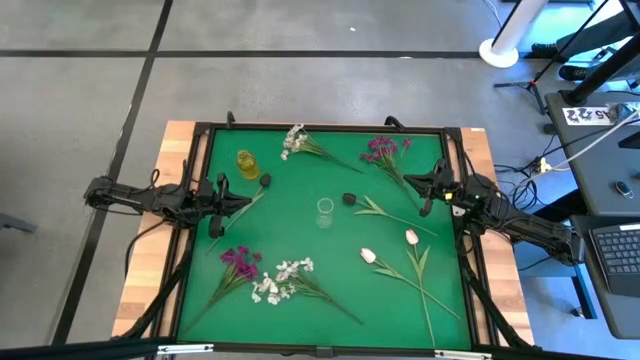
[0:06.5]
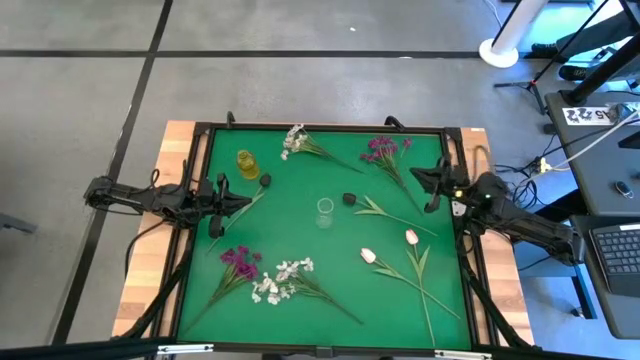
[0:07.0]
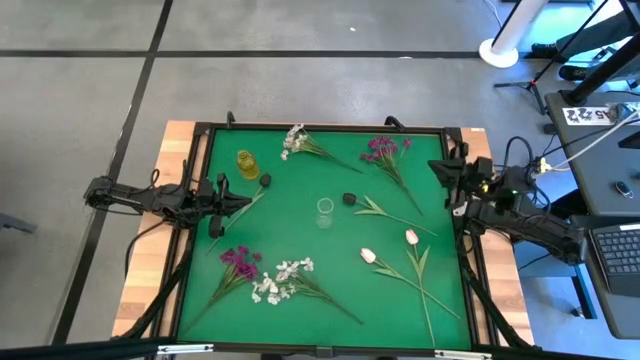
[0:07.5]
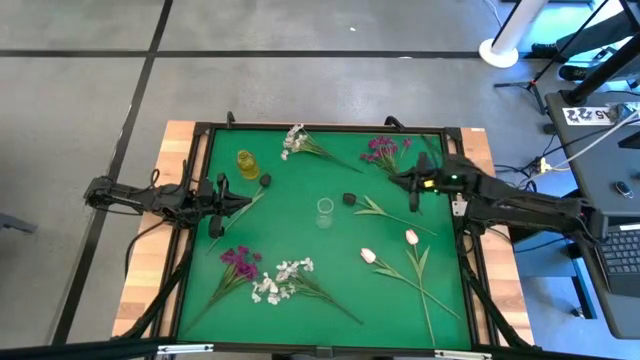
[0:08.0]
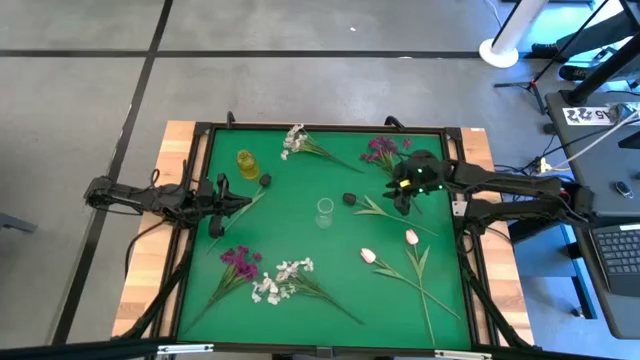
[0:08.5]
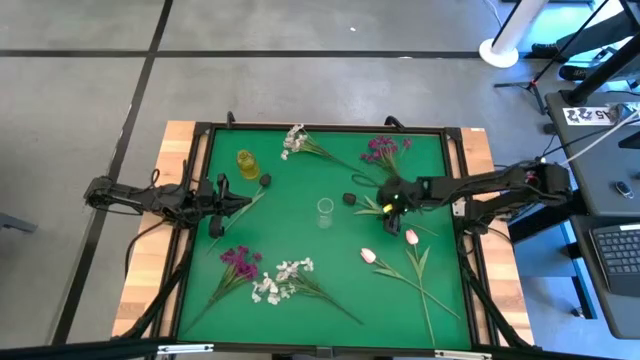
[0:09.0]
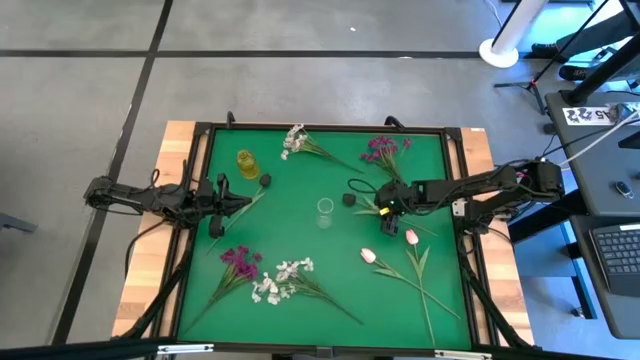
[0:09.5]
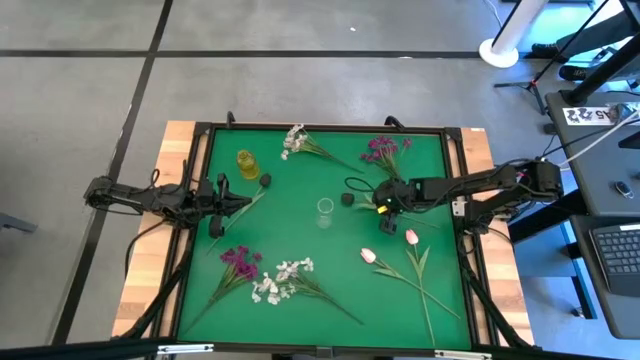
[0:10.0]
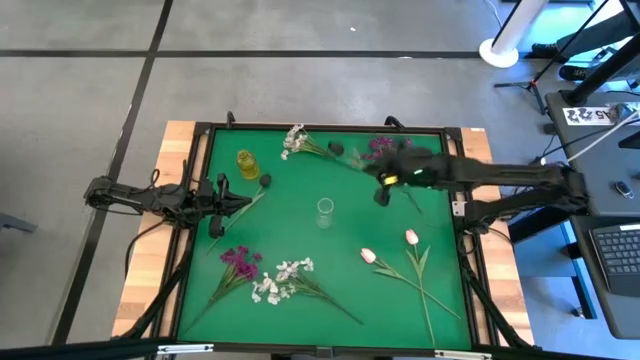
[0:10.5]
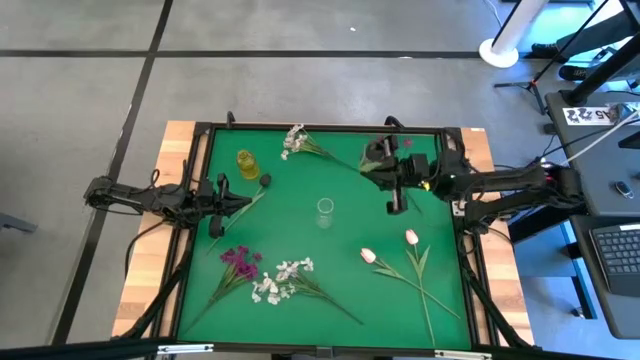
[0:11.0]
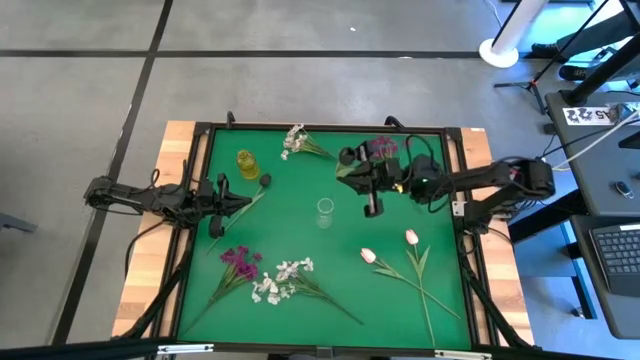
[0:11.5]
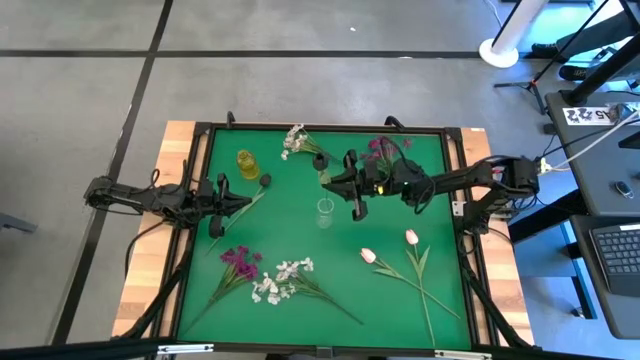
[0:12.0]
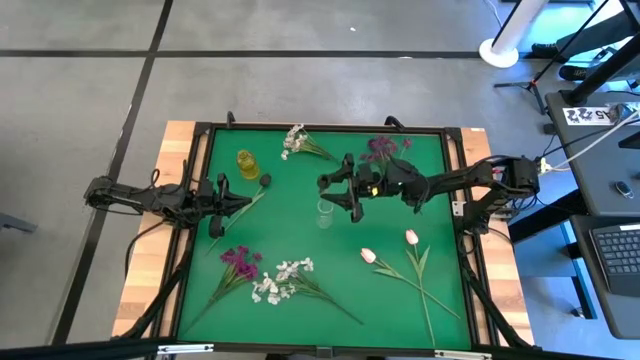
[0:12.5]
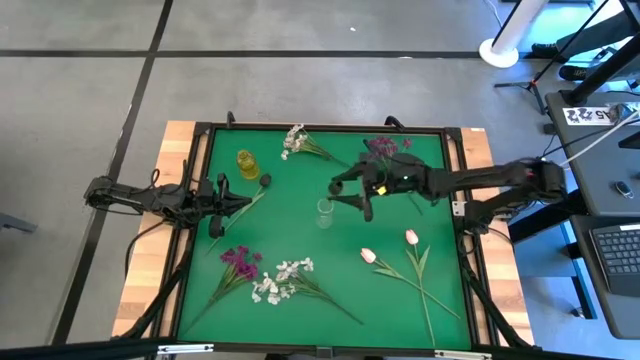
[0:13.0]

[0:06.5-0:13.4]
Task: Sort flowers into vase by color
Put the right black tulip into the transparent vase

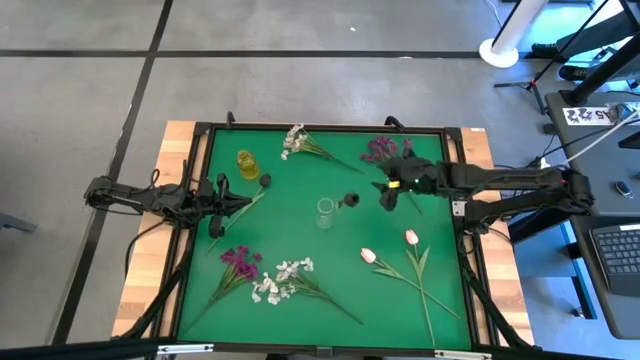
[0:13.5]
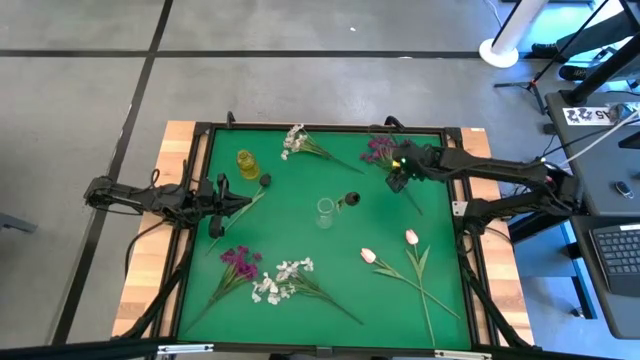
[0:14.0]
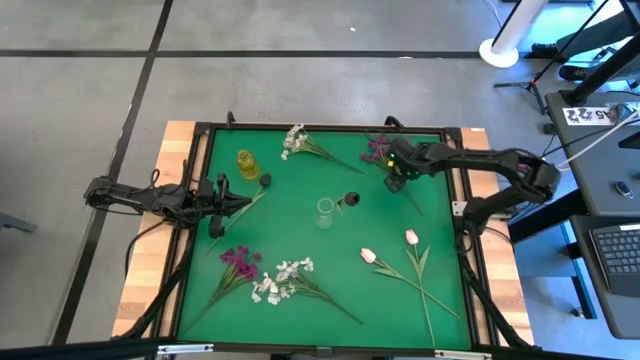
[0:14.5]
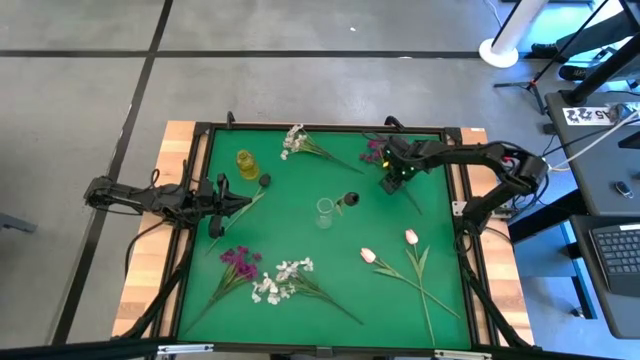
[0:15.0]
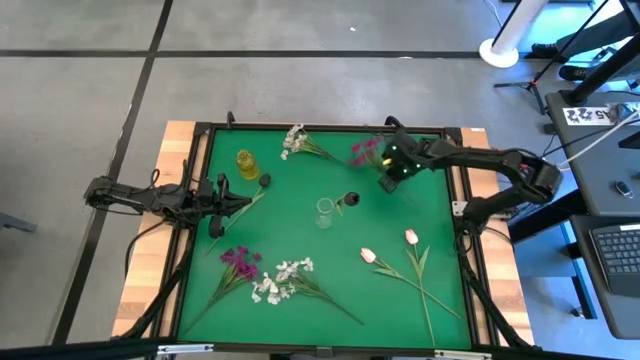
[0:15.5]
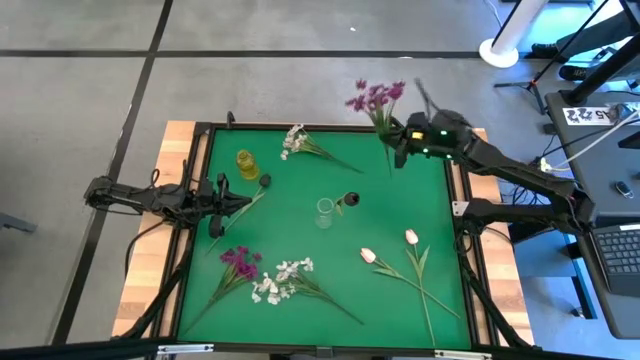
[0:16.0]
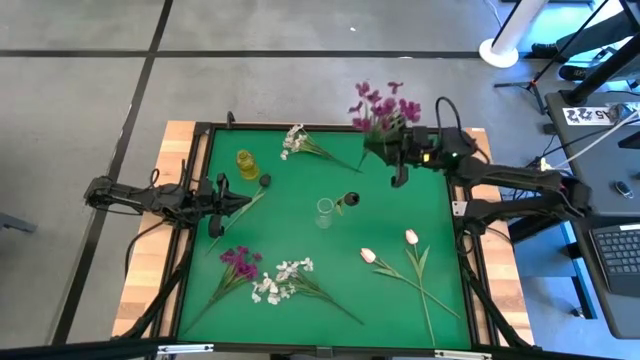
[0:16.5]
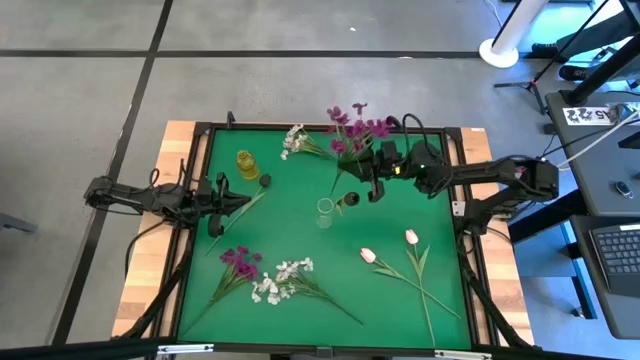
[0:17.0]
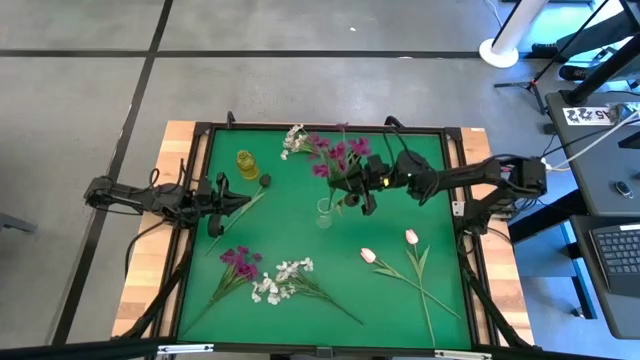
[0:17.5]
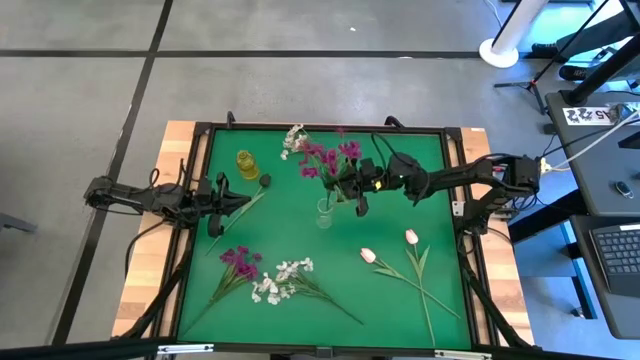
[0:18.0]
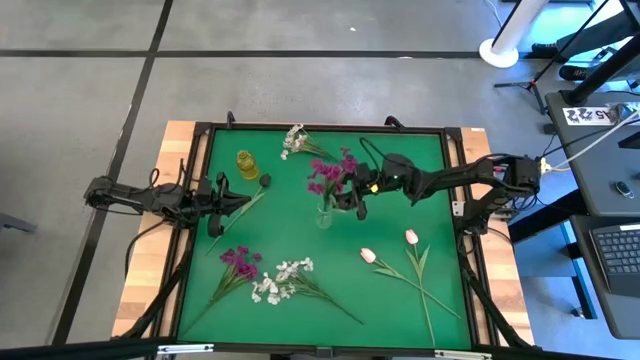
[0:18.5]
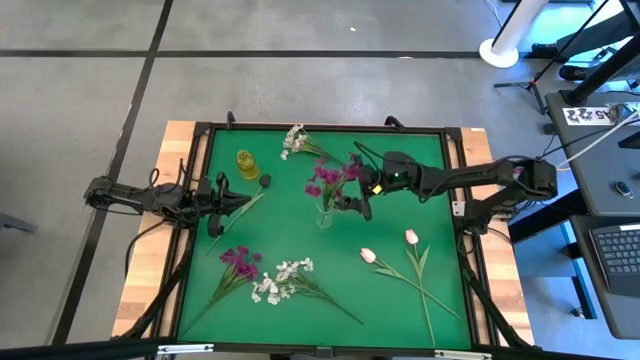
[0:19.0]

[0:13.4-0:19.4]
Put the top violet flowers into the transparent vase

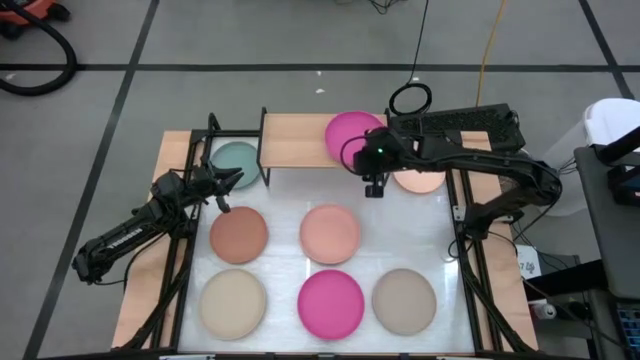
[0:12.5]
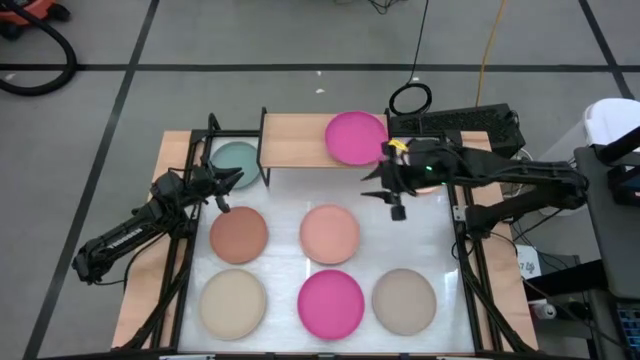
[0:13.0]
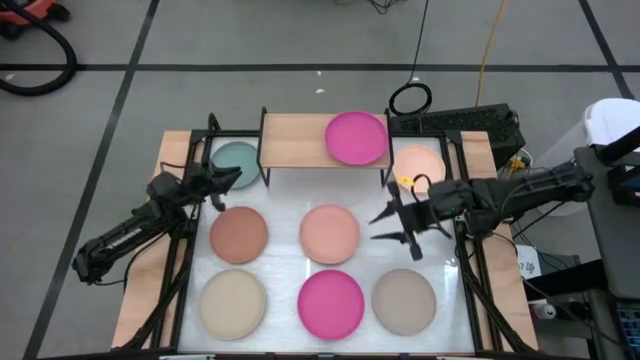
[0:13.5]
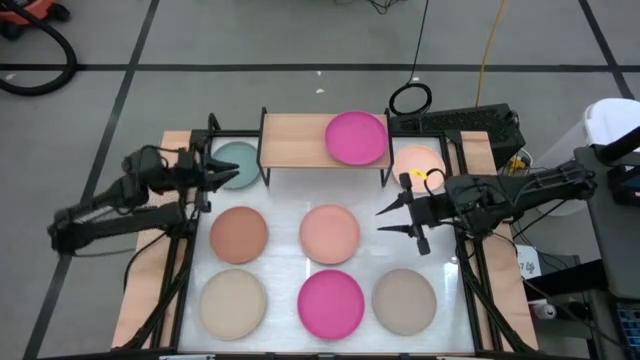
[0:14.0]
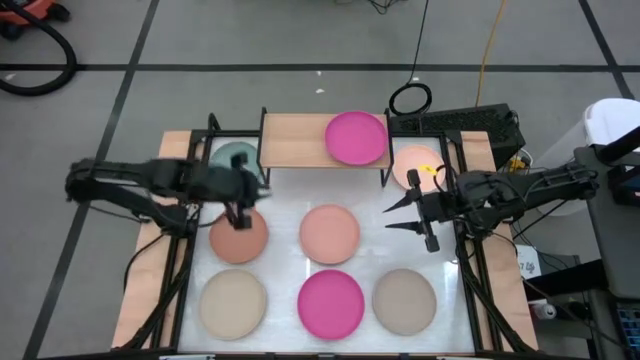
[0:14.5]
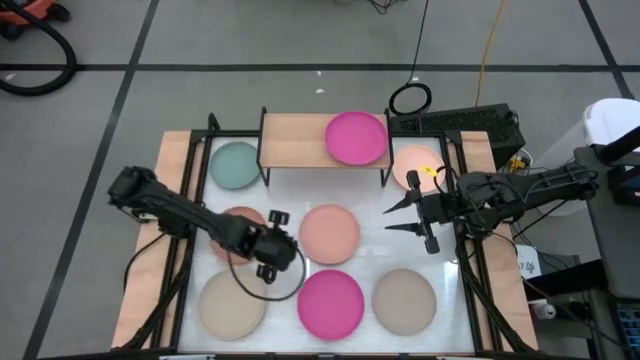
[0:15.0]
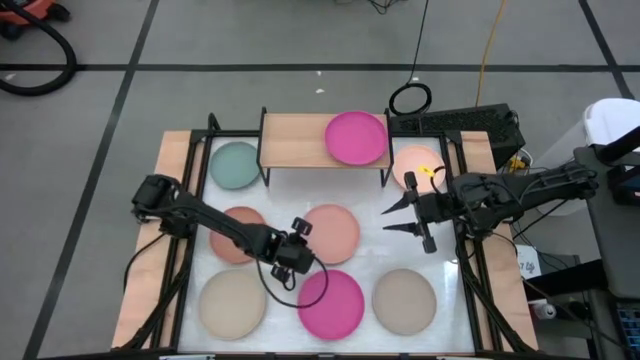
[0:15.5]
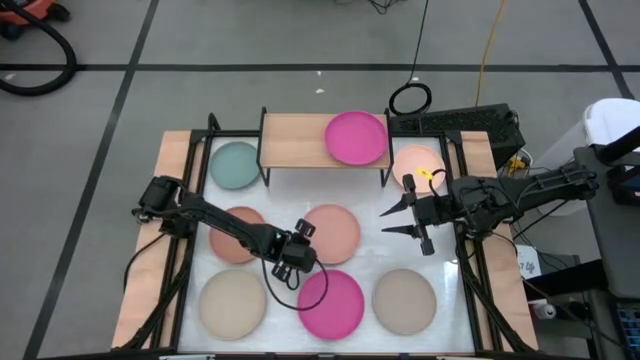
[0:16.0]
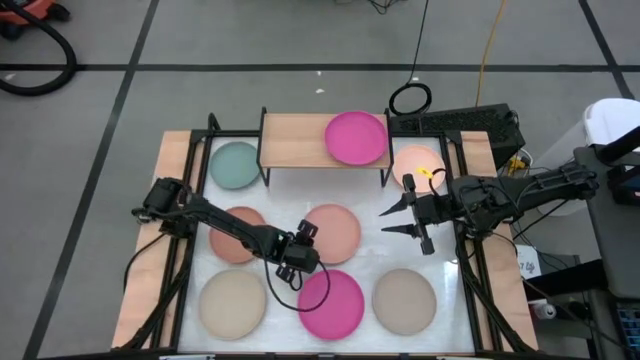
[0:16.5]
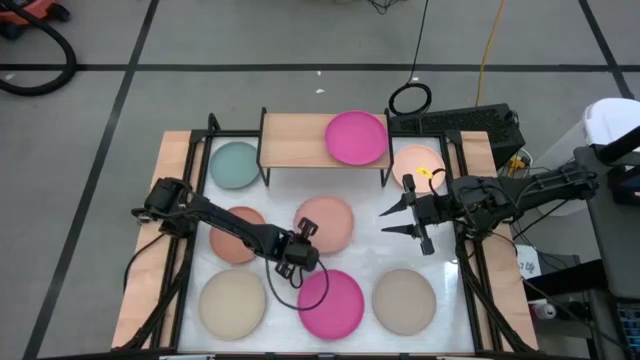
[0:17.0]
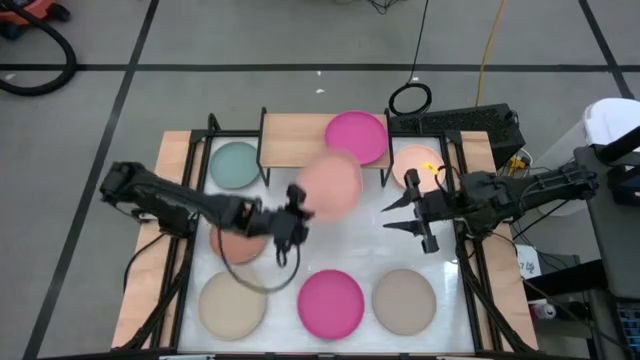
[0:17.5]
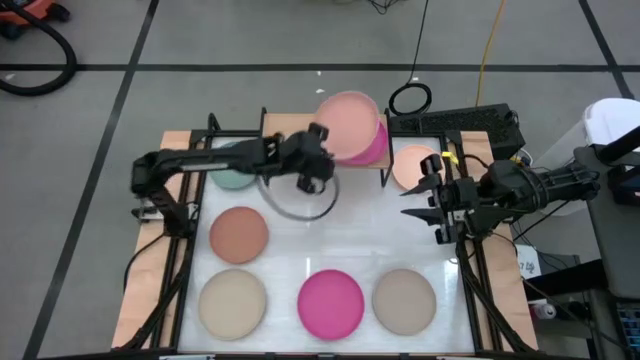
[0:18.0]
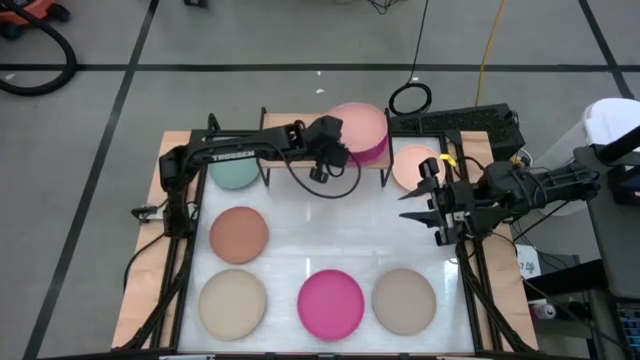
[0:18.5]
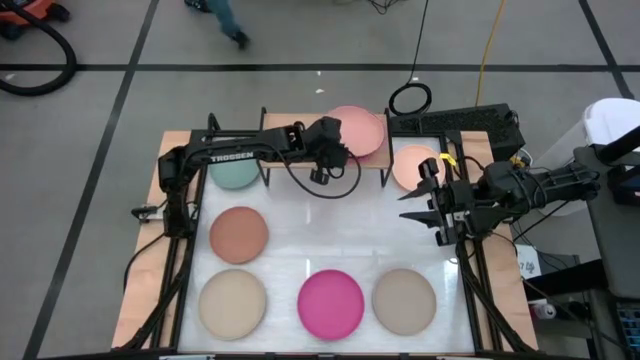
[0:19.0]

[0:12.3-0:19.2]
Task: Place and stack plates onto a shelf
Stack the light pink plate on the pink plate on the shelf

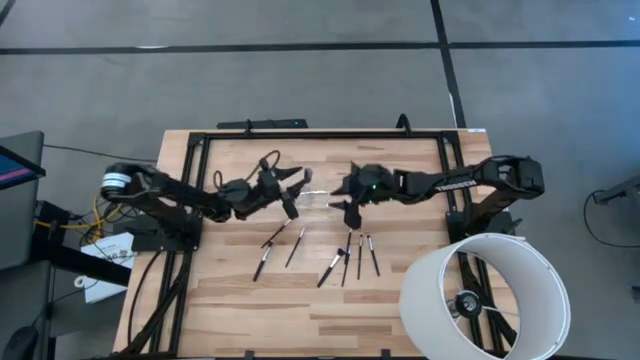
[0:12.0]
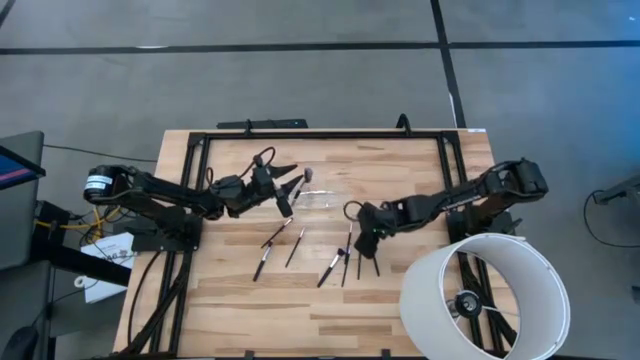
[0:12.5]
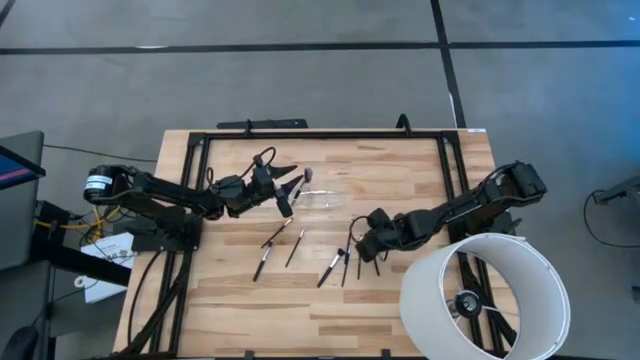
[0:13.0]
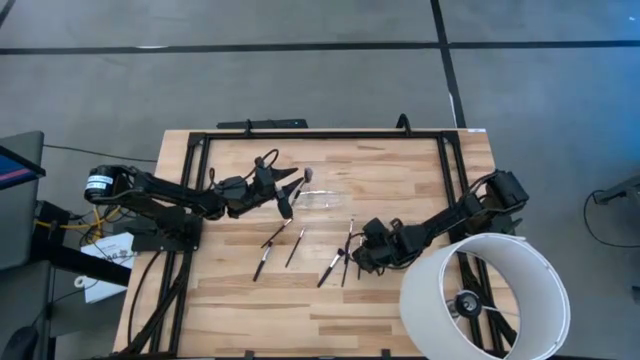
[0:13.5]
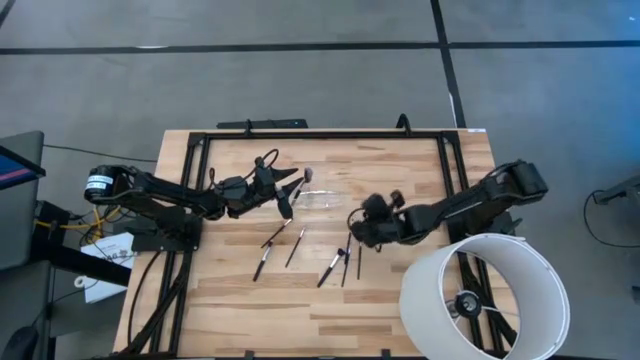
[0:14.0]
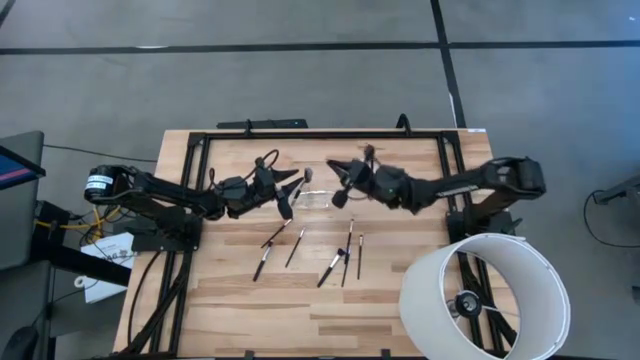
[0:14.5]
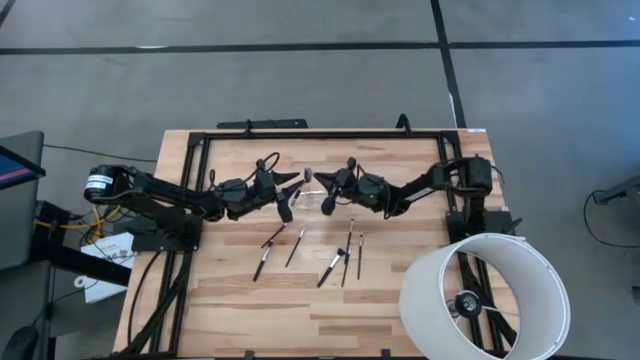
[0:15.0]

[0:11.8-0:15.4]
Task: Put items in baskets/containers
Put the eyeshadow brush into the transparent organizer
